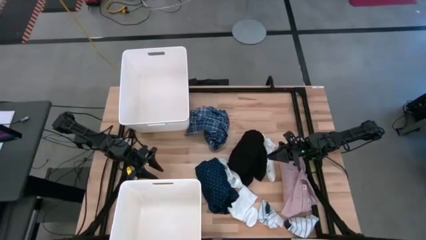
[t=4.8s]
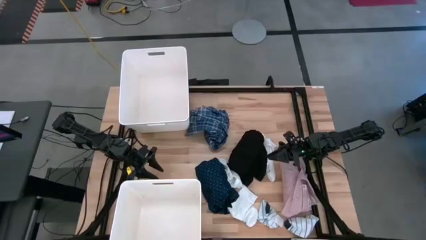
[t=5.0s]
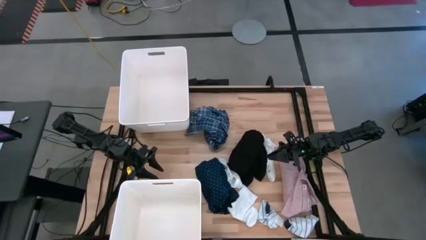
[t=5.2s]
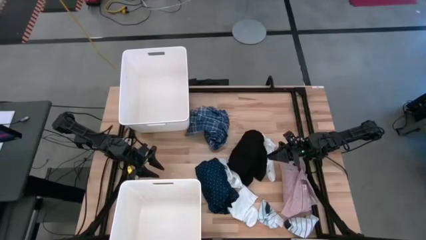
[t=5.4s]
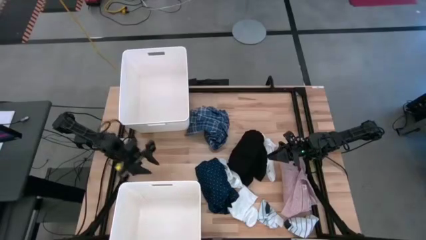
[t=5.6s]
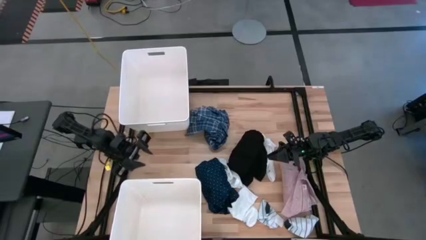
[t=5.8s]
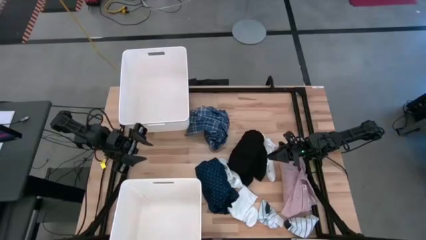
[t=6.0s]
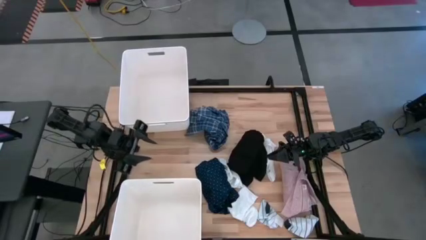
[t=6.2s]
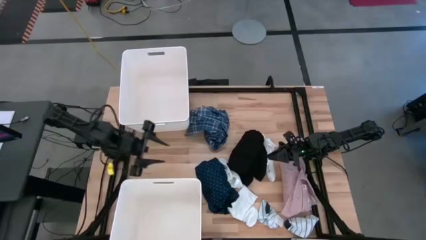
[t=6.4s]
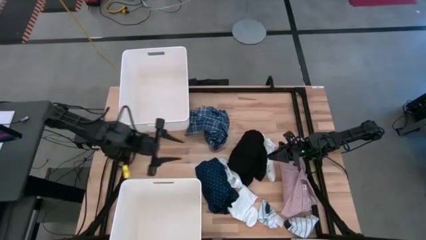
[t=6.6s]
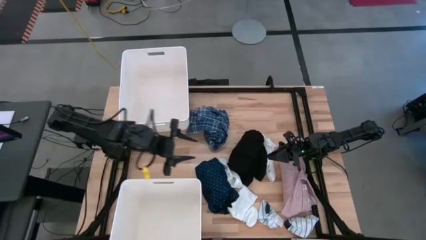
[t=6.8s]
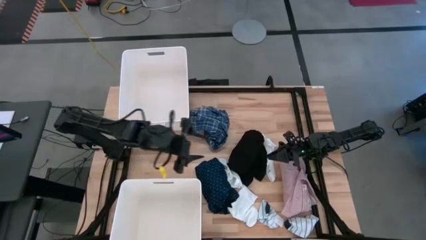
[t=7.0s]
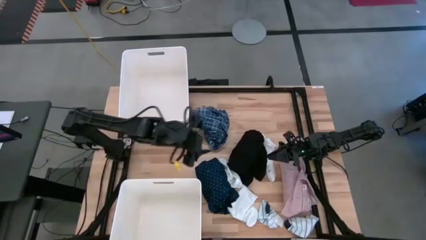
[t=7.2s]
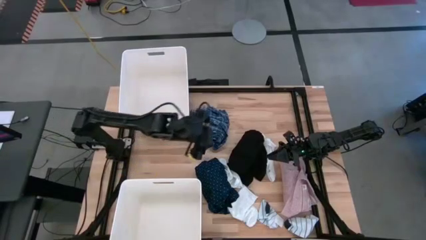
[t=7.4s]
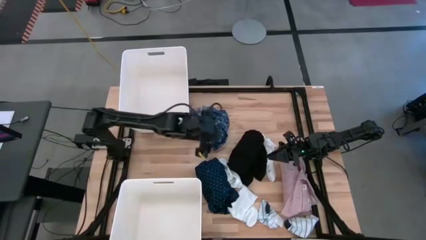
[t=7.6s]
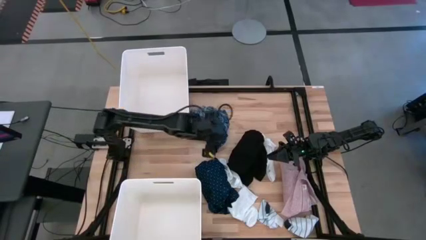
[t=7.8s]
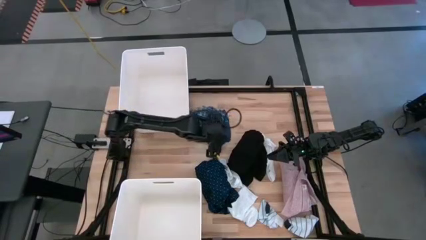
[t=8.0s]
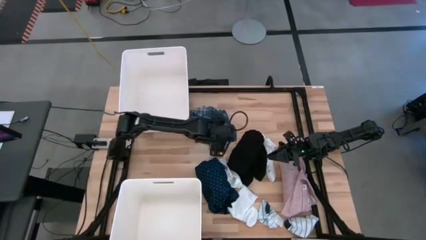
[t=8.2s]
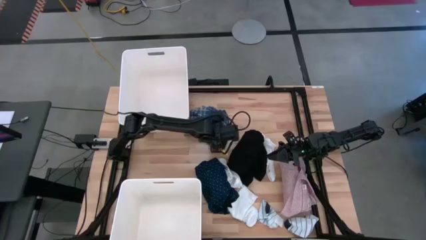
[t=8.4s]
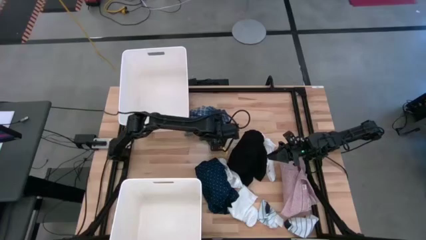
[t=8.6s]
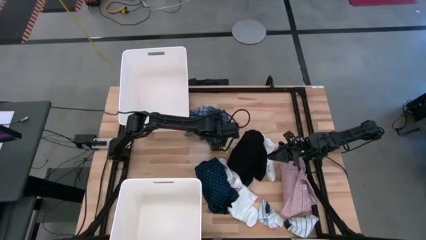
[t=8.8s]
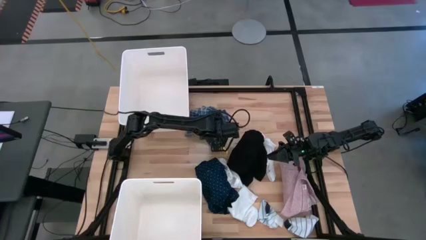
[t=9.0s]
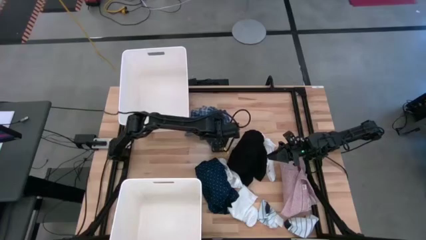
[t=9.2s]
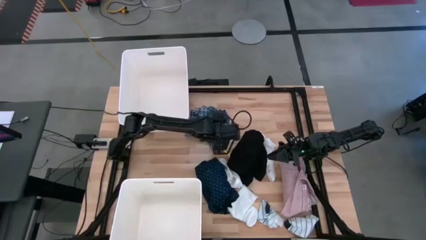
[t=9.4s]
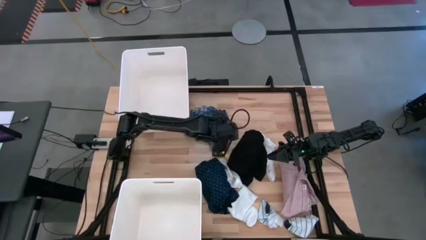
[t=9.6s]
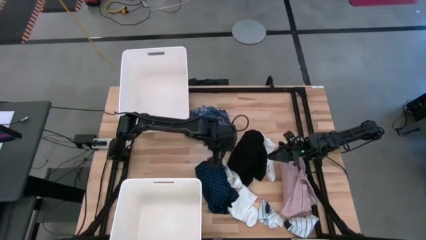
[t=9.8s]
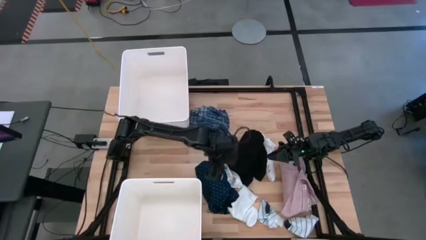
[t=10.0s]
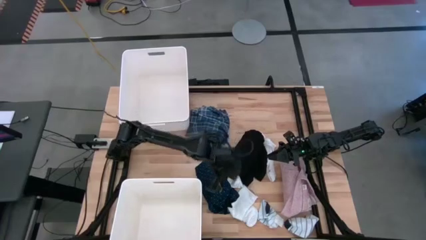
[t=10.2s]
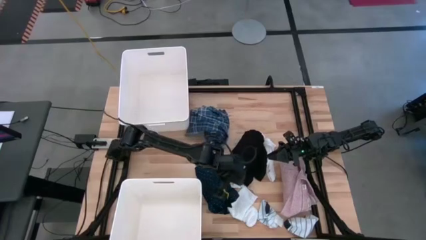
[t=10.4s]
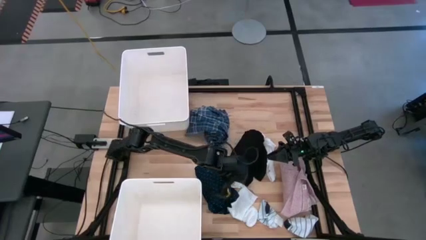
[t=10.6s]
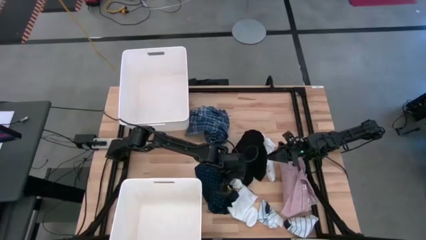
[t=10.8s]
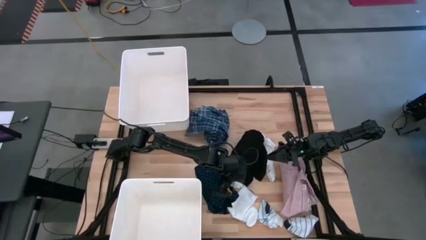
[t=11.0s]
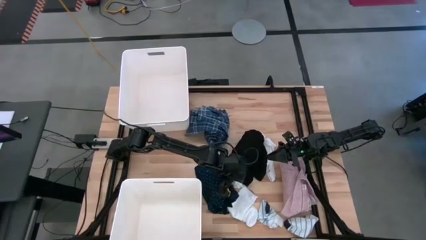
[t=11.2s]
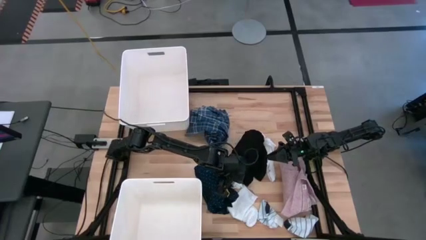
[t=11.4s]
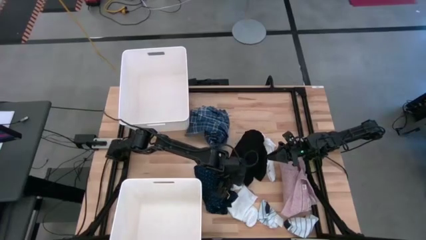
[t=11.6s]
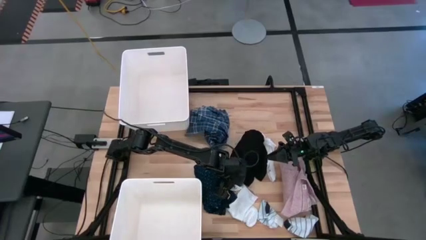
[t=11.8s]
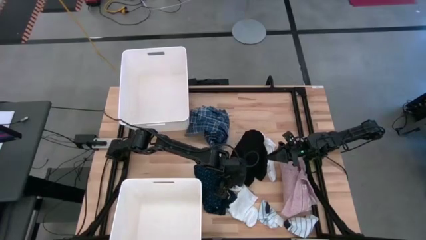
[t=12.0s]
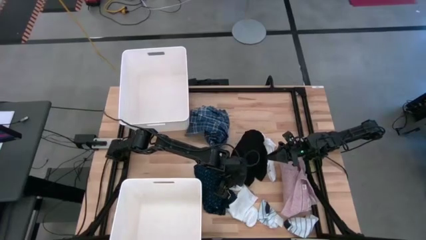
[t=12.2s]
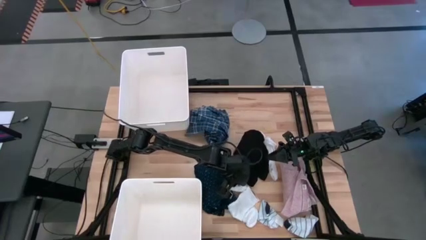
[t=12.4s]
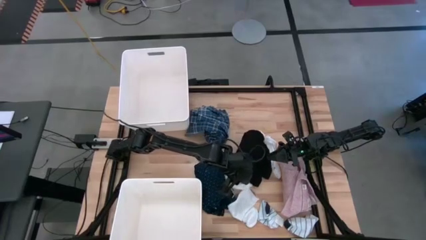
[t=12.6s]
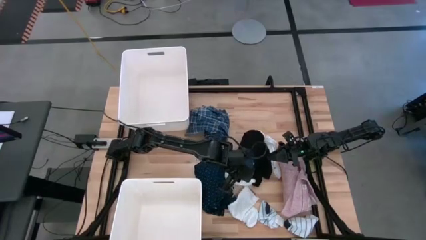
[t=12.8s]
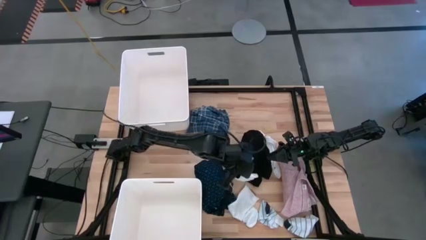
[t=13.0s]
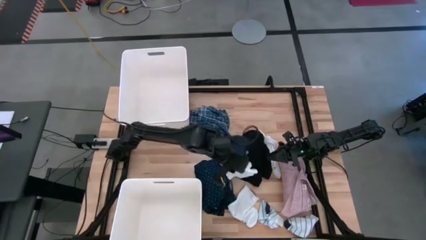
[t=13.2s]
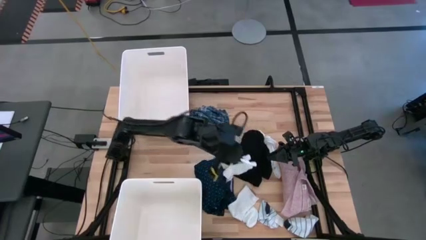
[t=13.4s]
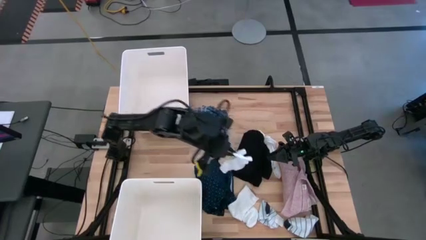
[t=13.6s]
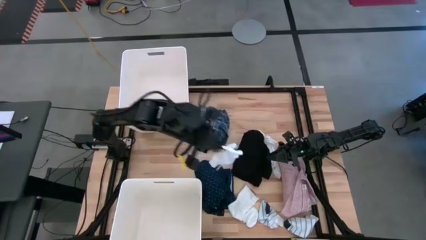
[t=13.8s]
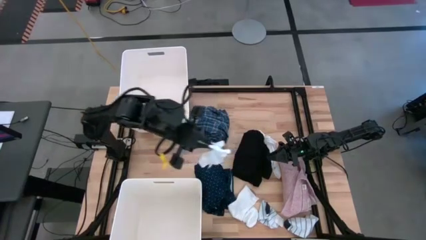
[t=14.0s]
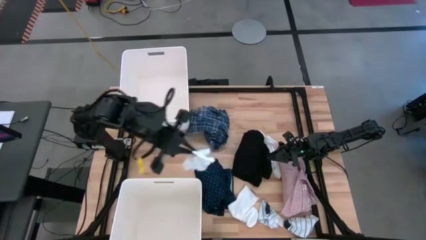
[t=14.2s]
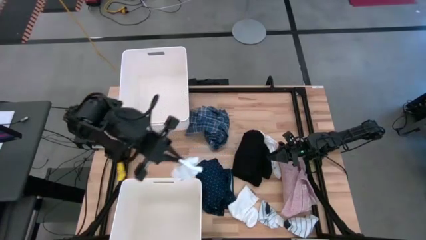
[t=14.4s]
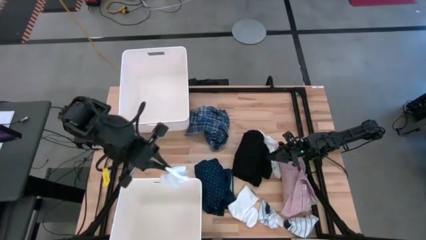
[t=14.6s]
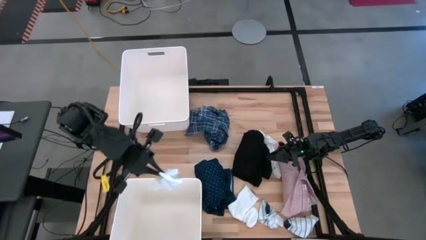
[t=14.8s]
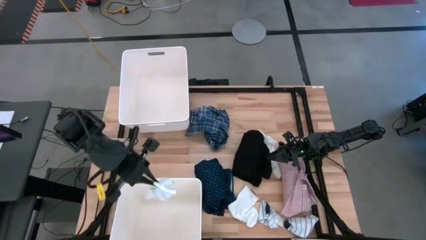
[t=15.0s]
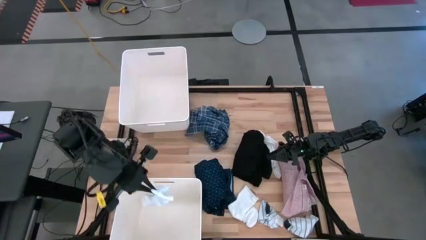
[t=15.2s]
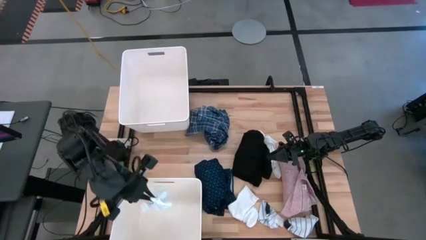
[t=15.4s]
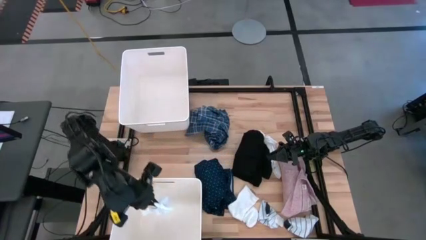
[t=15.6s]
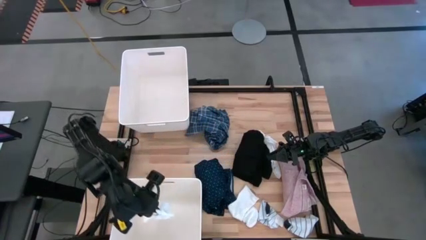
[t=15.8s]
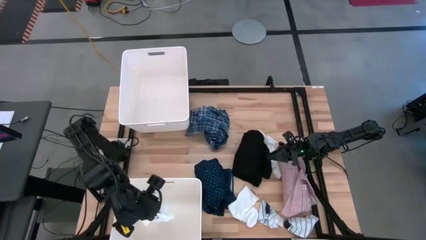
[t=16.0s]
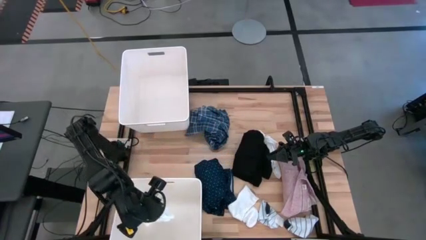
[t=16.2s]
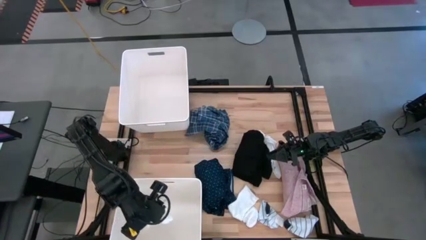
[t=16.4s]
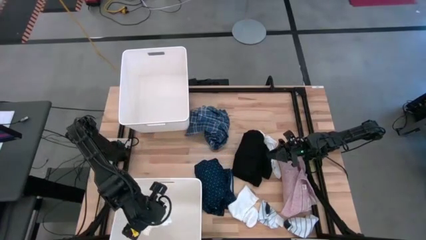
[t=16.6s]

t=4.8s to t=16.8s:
Task: Sort clothes
Put the middle white sock into the bottom white bin
